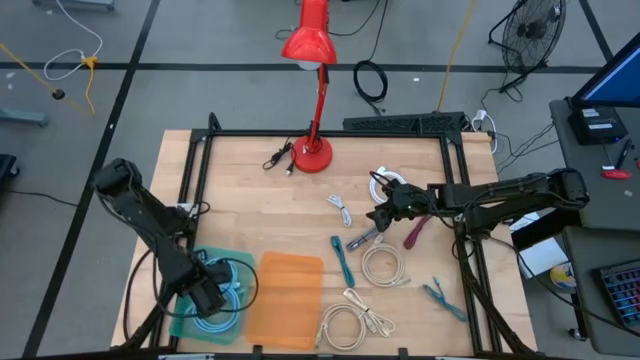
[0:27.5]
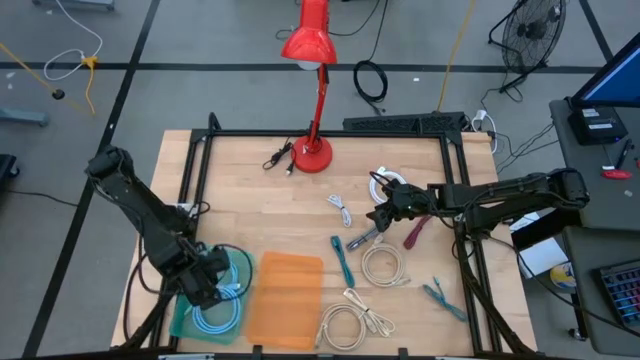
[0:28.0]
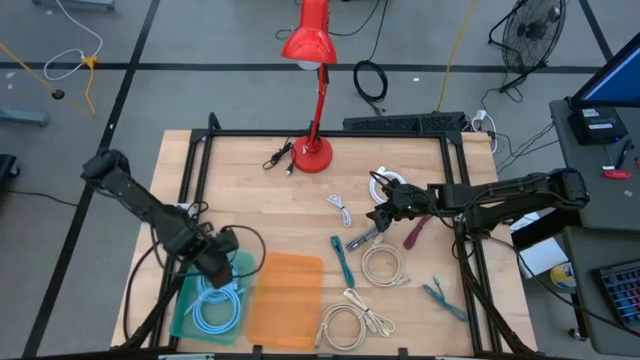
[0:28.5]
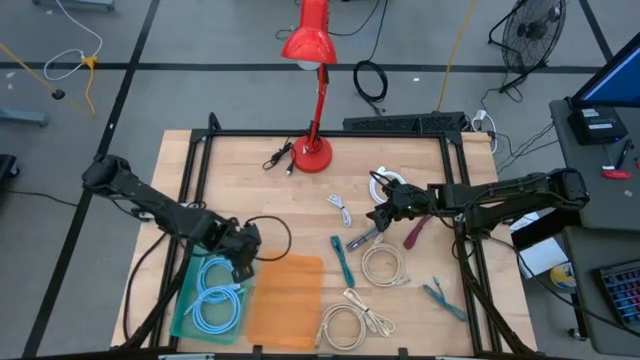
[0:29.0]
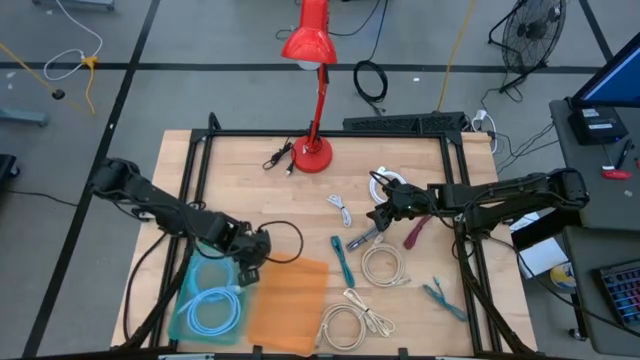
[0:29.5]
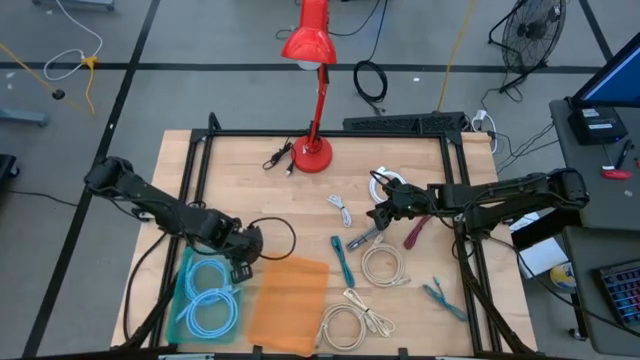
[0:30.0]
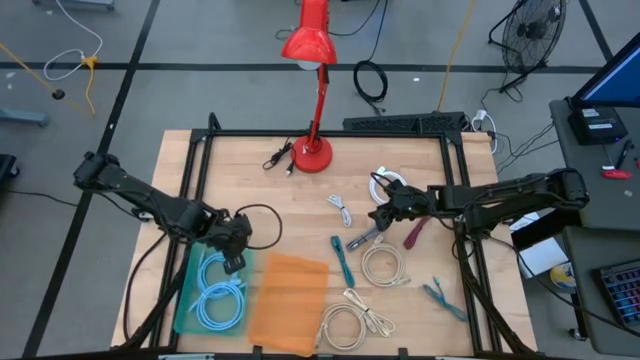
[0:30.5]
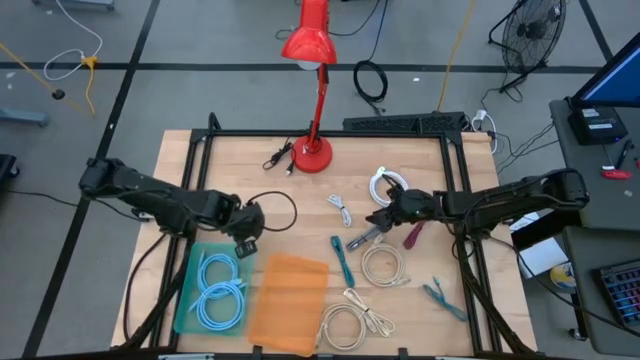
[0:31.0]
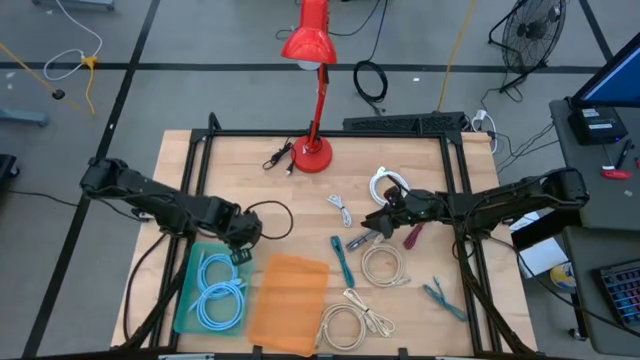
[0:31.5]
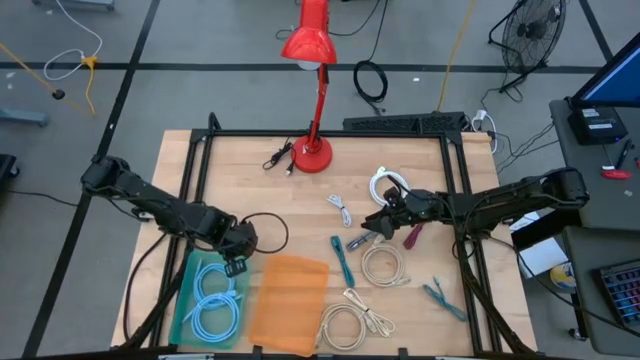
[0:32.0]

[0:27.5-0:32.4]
Task: Pick & Place USB Port
Adjust the blue bin

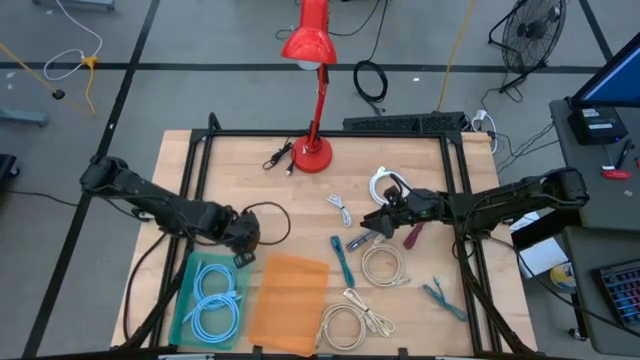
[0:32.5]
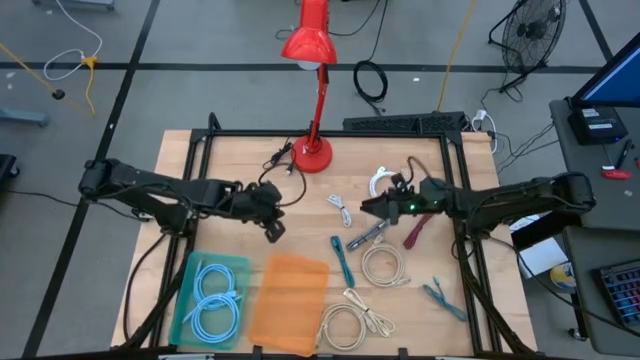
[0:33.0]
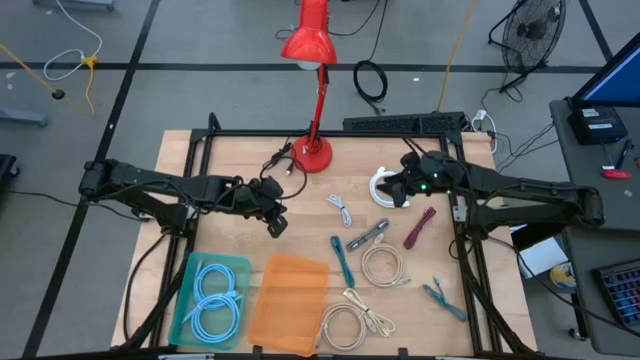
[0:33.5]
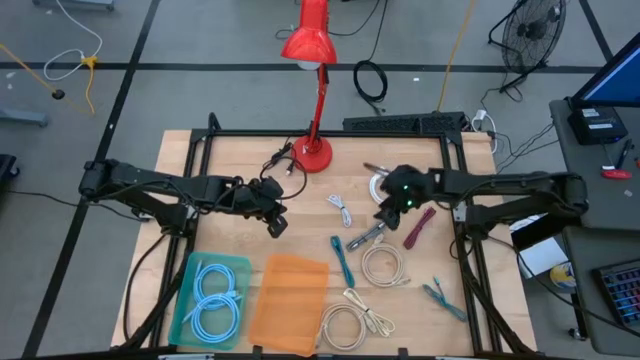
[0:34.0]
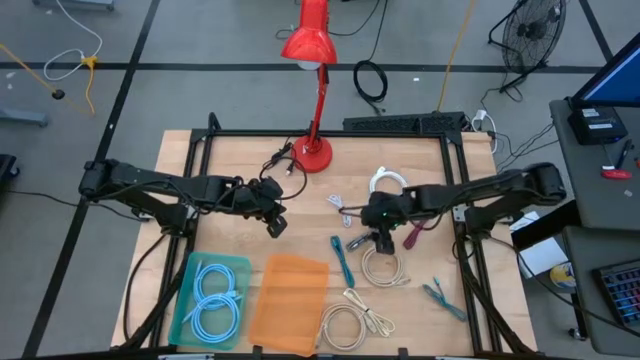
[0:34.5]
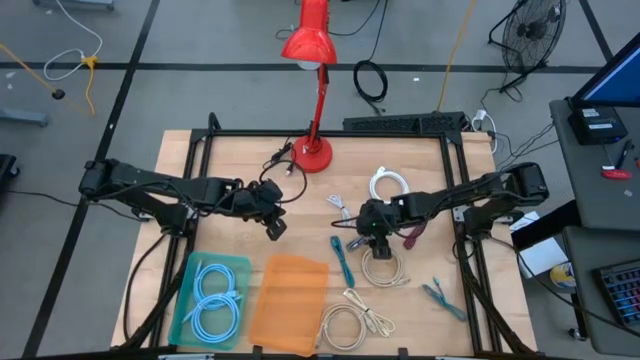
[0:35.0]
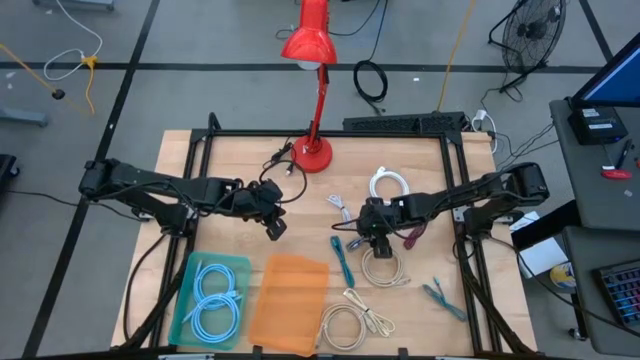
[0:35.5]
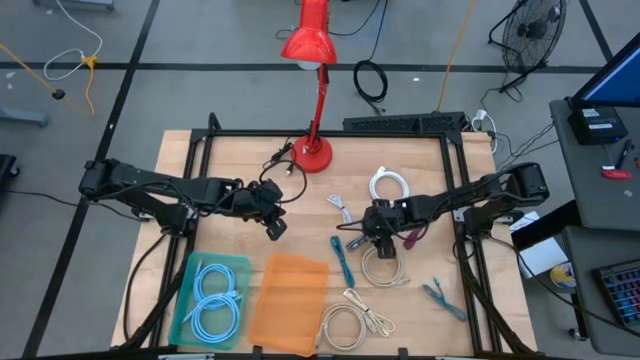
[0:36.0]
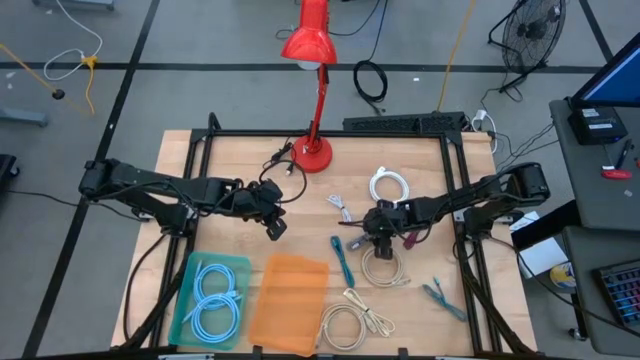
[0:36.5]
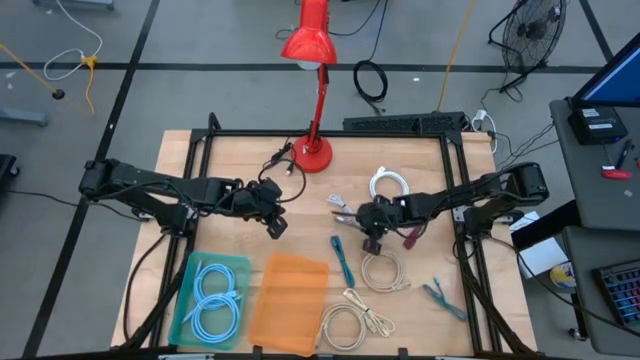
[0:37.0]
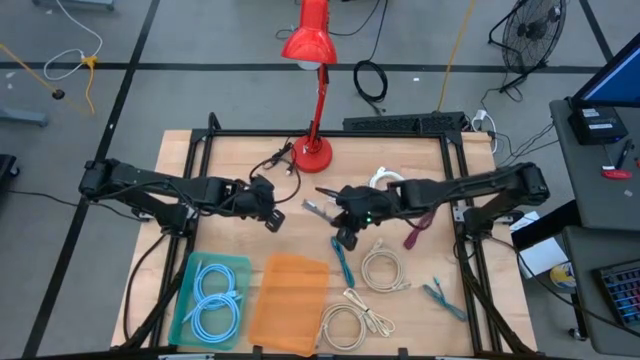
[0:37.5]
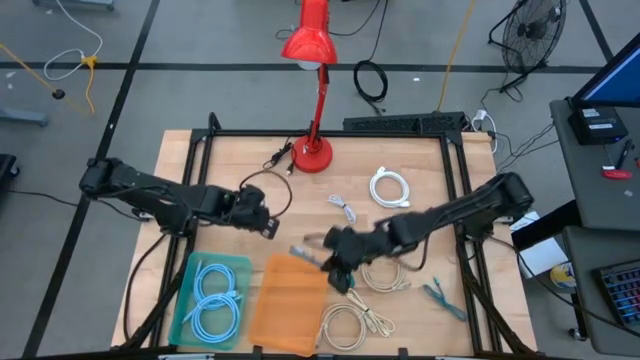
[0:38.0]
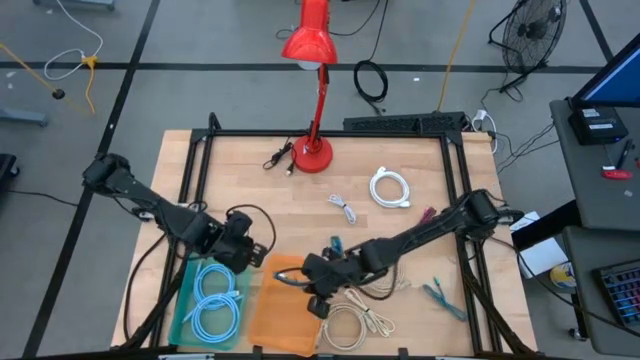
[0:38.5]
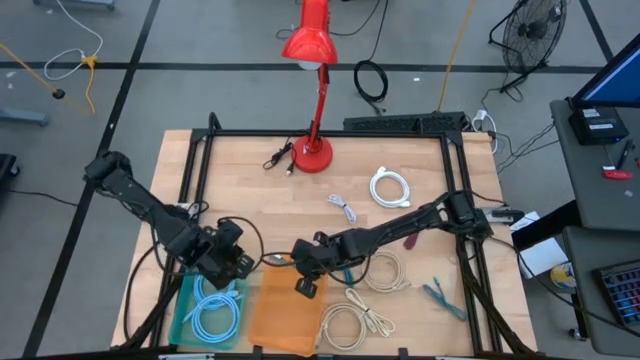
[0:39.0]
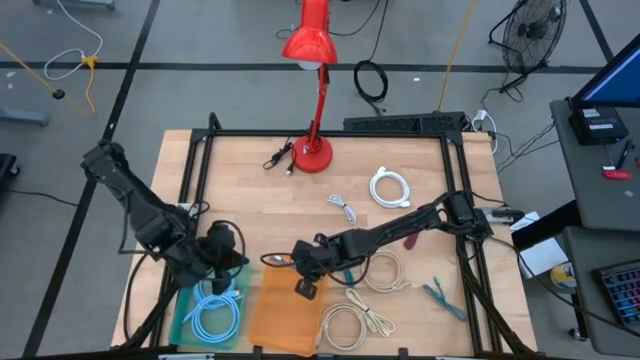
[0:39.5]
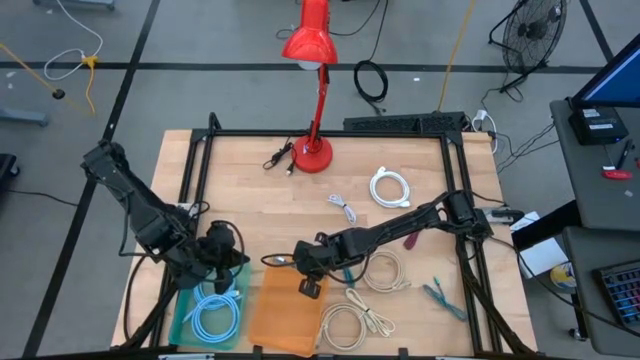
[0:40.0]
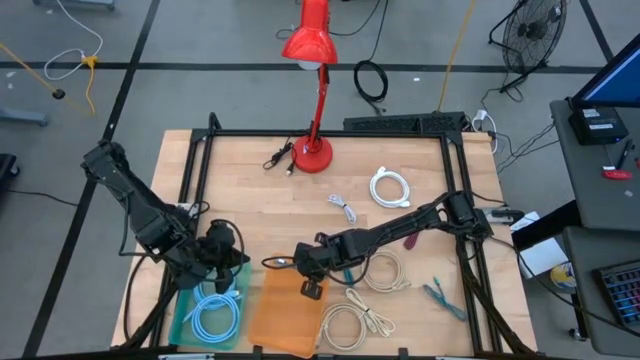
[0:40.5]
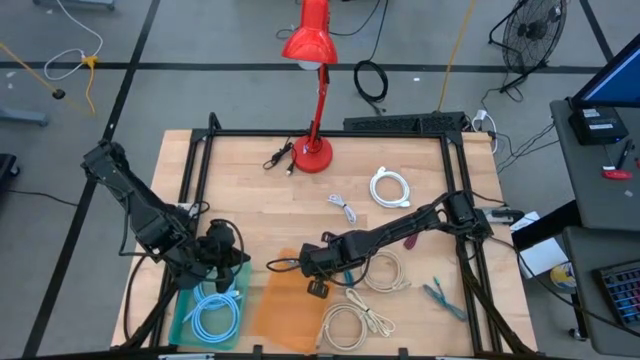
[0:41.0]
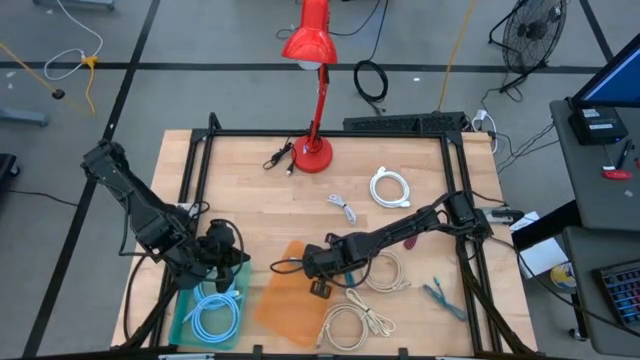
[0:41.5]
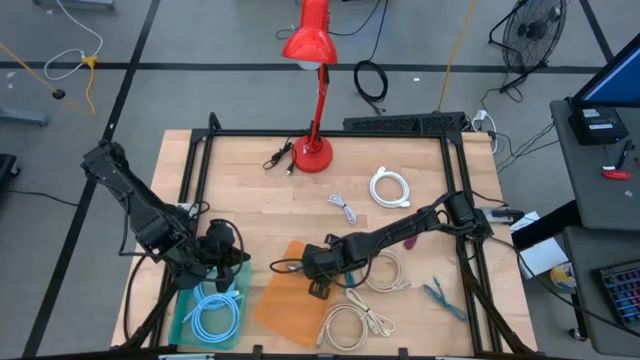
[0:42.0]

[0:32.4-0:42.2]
Put the black USB cable into the orange bin

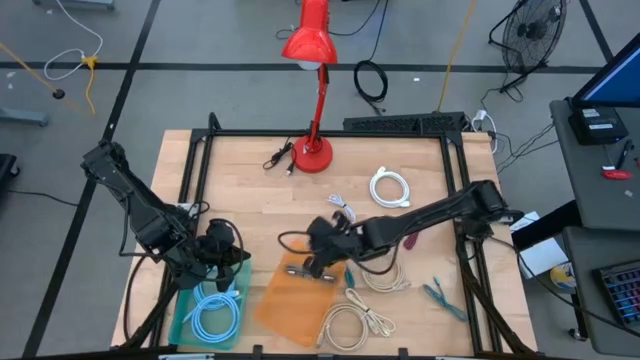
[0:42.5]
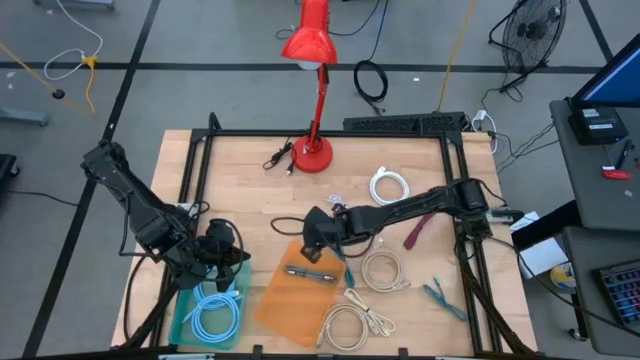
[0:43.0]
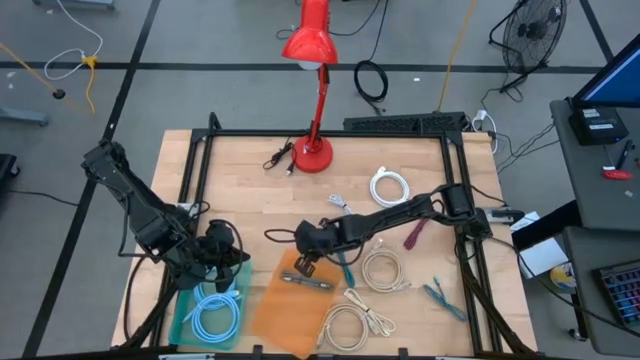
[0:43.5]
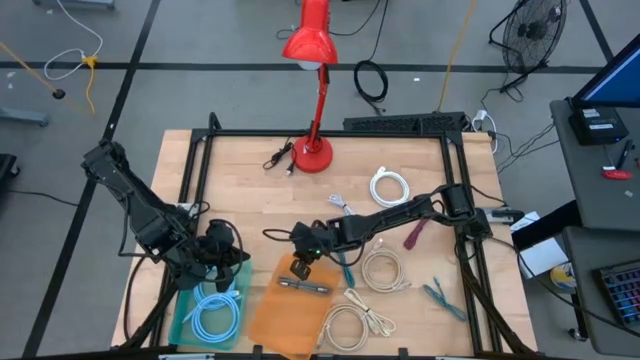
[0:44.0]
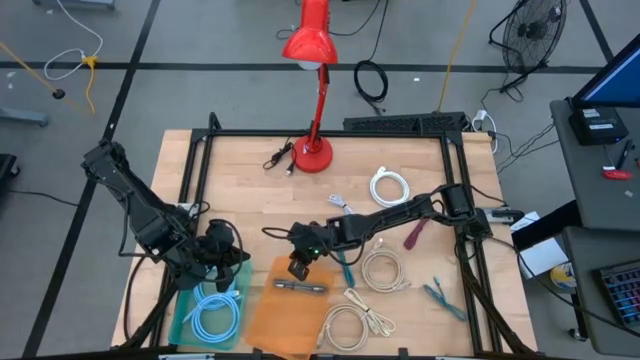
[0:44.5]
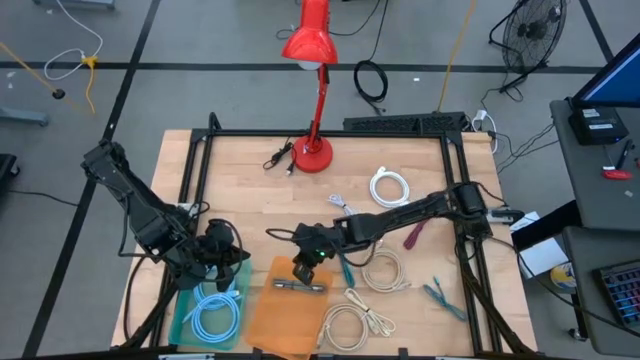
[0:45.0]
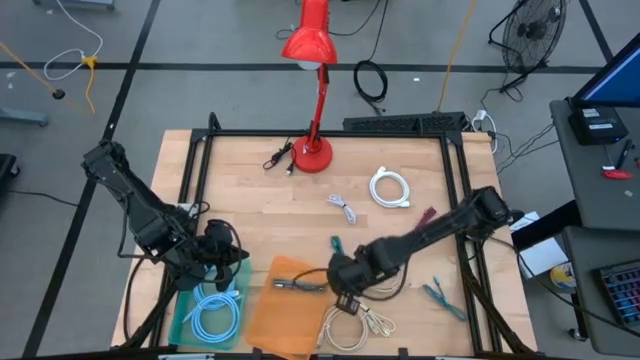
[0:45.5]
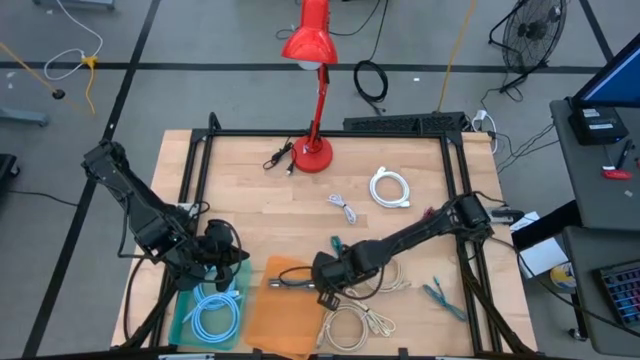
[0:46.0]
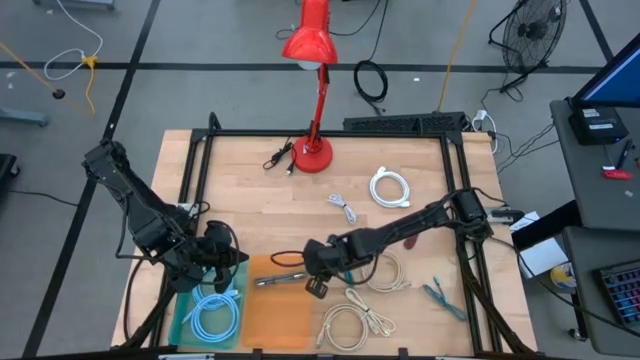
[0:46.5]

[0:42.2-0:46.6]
Adjust the orange bin
